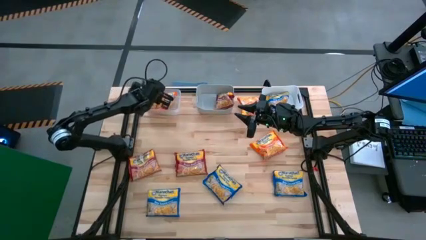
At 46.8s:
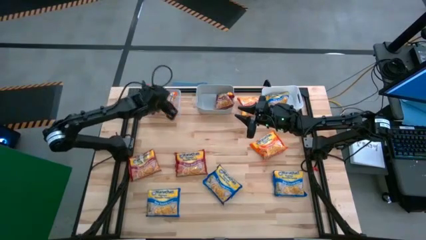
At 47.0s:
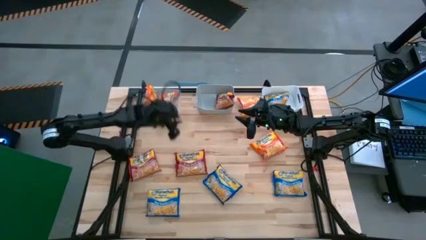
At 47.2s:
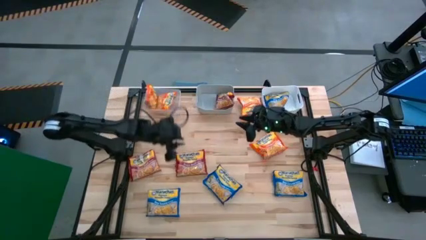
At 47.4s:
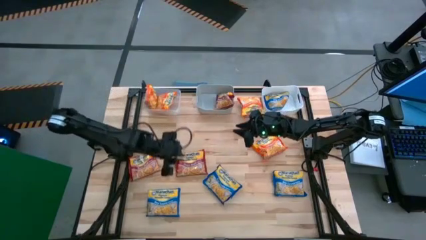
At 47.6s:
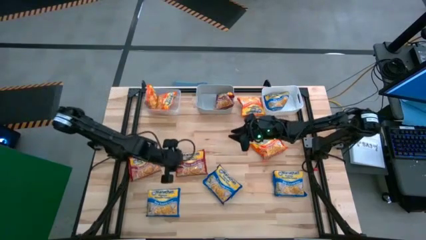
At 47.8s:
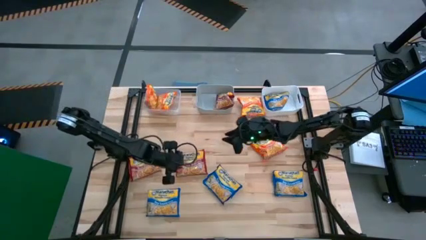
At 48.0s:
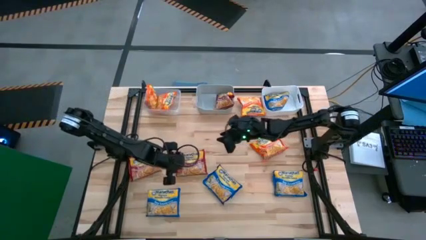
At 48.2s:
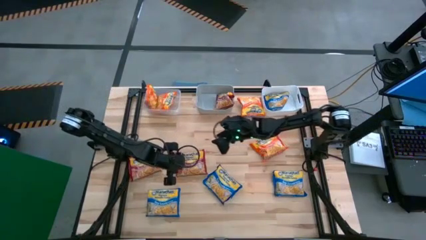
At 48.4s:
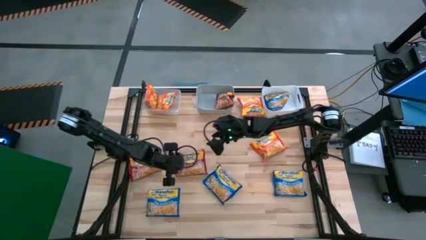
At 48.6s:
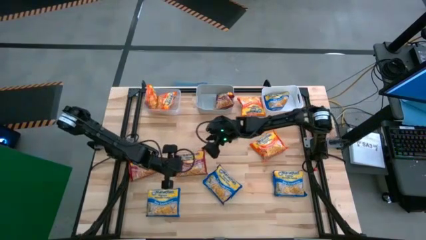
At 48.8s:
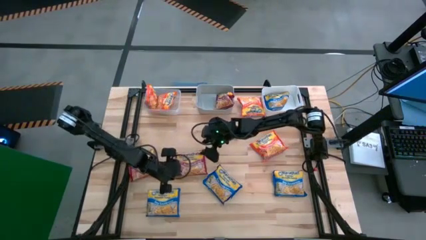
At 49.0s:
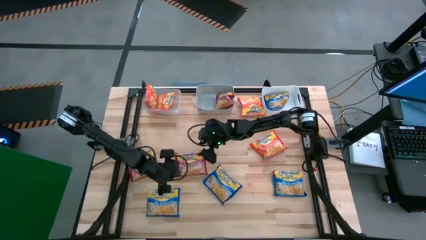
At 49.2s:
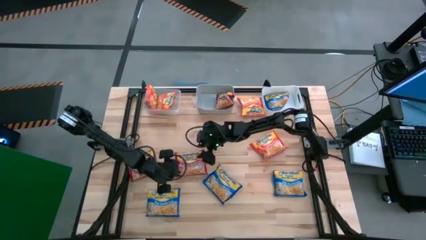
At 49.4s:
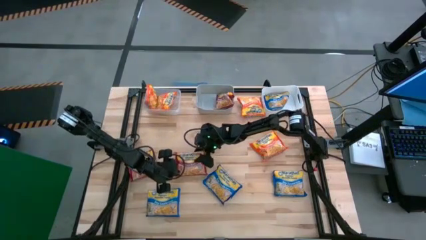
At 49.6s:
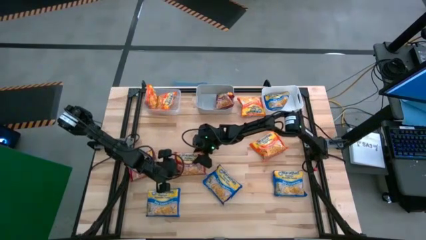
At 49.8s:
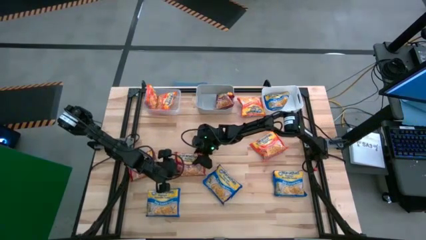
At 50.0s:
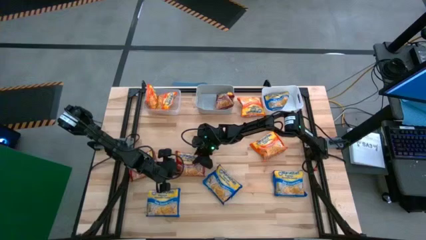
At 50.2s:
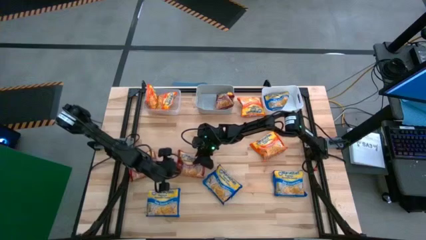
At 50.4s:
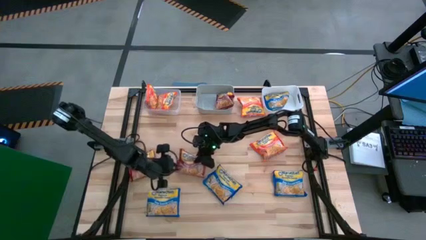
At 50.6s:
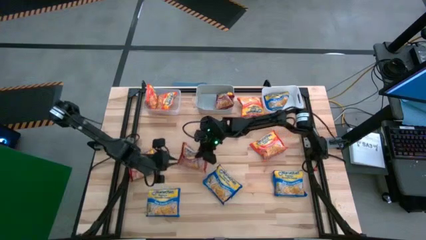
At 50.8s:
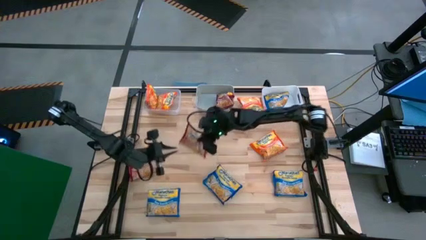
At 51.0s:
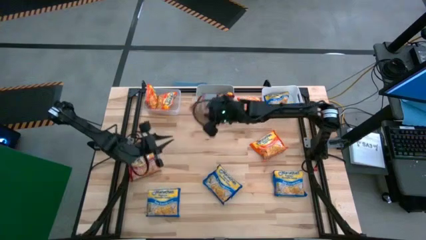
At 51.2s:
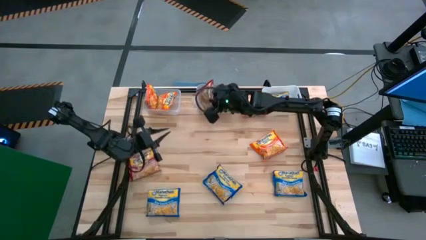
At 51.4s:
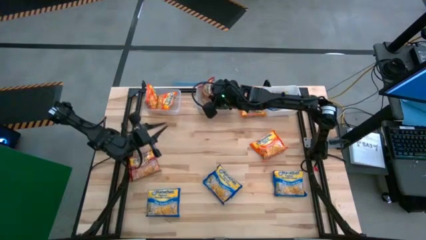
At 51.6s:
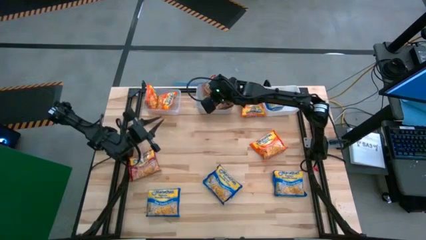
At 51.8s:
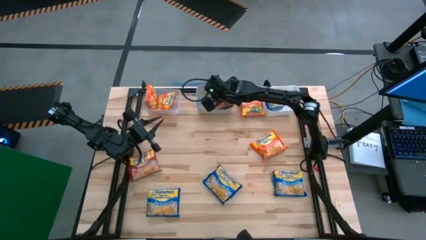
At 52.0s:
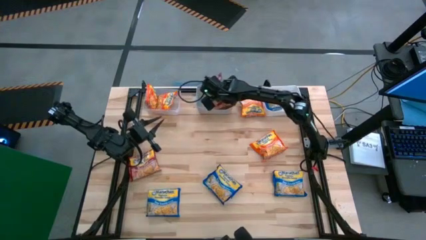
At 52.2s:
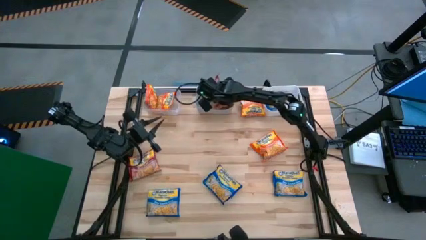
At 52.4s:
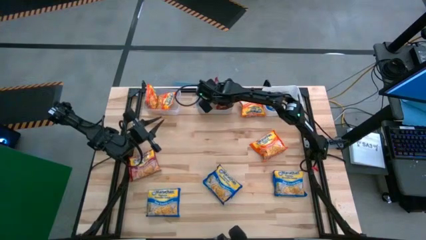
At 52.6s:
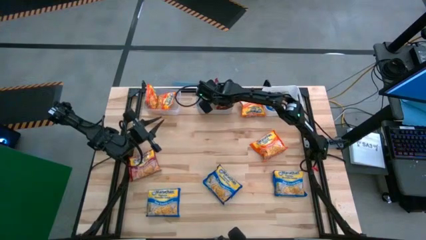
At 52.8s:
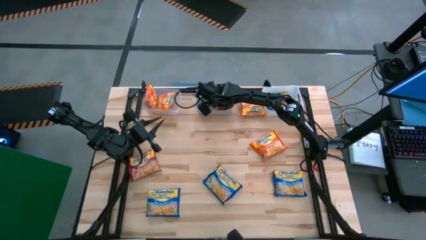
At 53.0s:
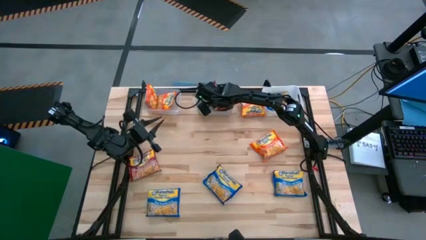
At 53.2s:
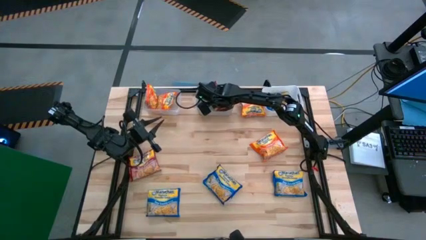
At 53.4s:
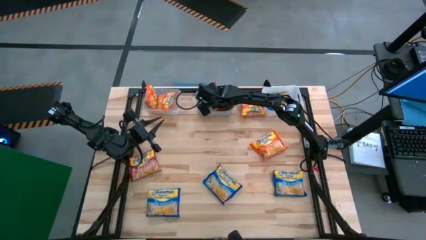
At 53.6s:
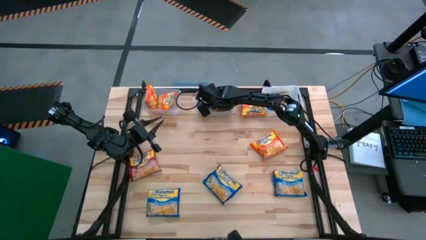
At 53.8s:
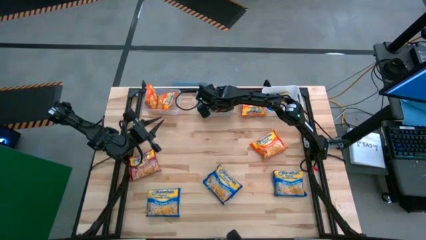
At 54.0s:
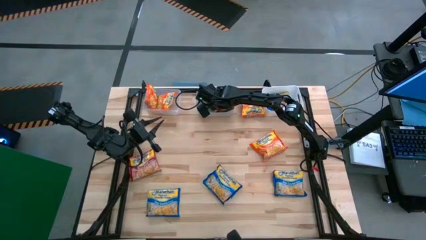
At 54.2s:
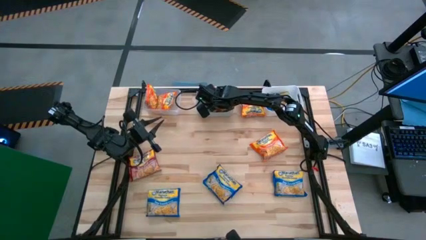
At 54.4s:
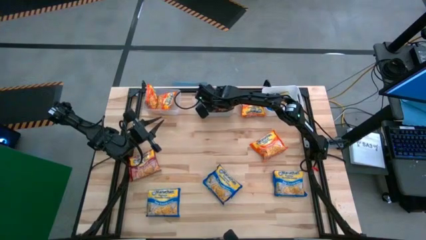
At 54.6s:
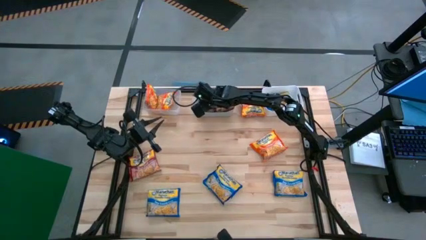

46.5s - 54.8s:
Task: Sort Maruchan noodles
Put the red noodle pack into the grey bin

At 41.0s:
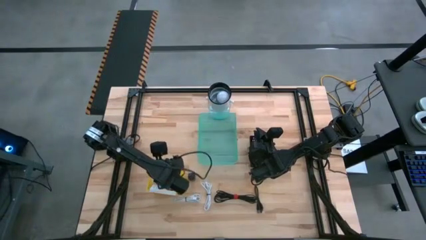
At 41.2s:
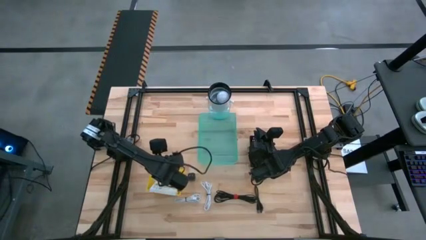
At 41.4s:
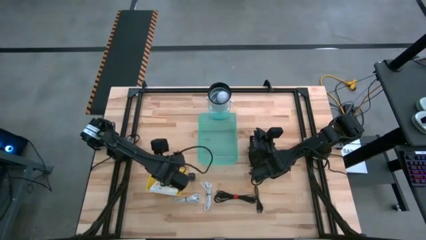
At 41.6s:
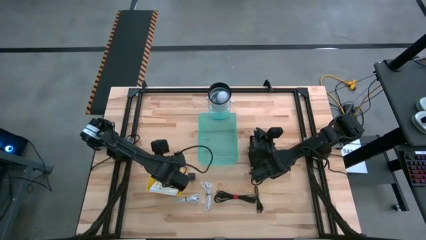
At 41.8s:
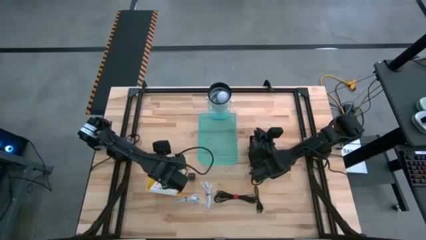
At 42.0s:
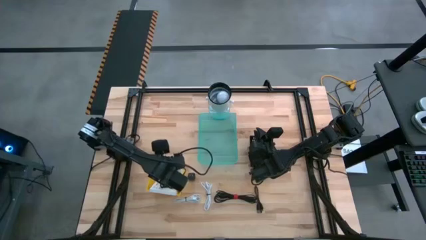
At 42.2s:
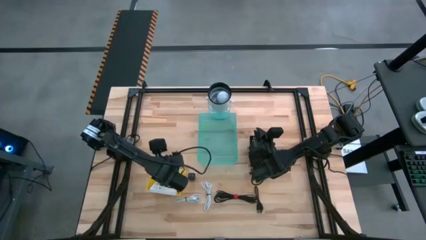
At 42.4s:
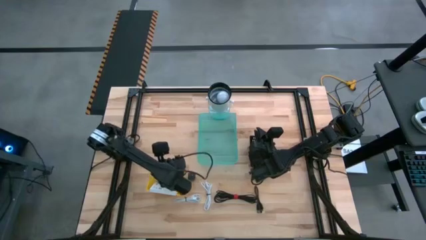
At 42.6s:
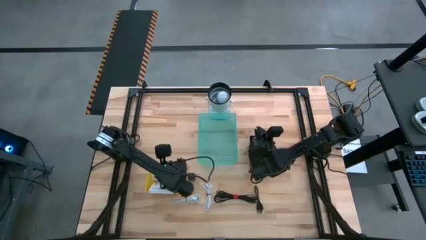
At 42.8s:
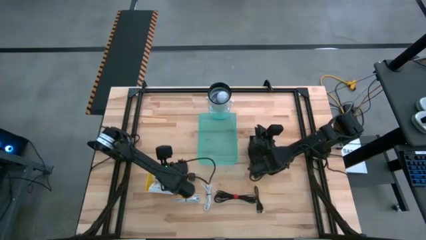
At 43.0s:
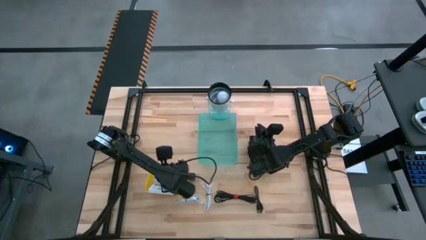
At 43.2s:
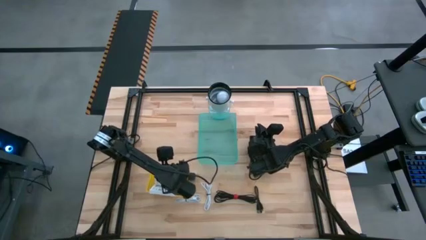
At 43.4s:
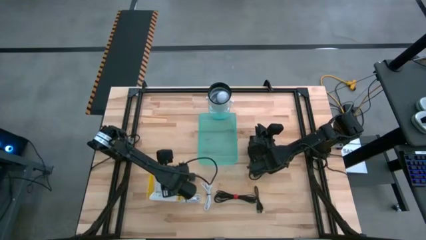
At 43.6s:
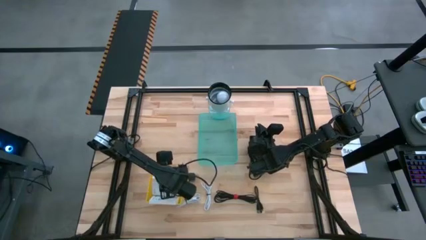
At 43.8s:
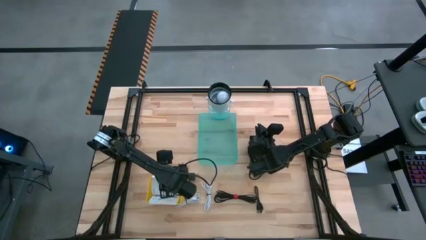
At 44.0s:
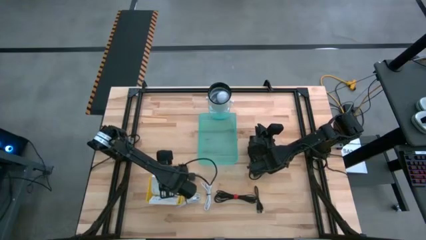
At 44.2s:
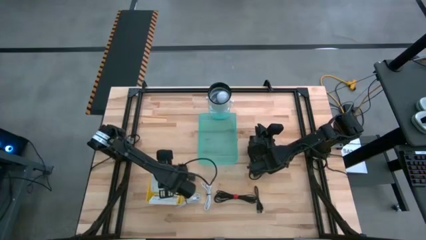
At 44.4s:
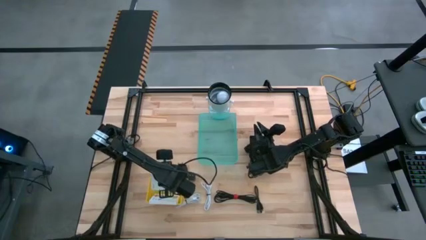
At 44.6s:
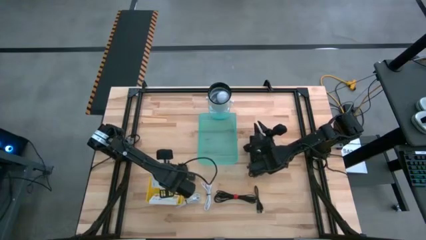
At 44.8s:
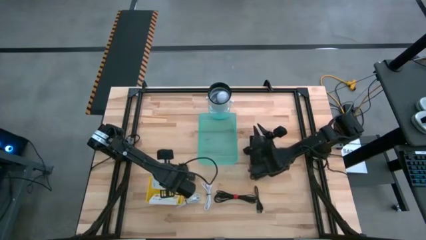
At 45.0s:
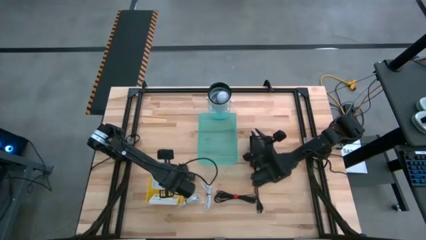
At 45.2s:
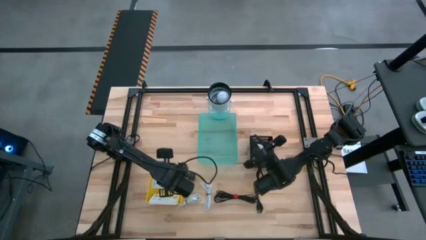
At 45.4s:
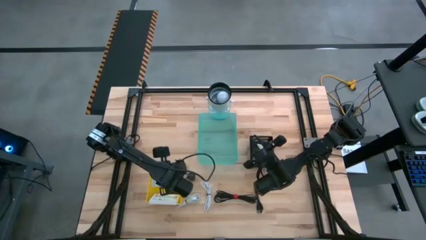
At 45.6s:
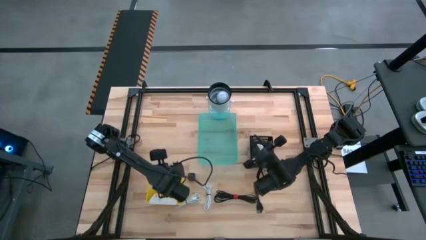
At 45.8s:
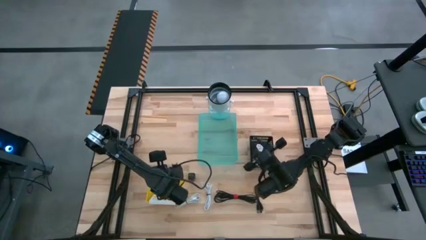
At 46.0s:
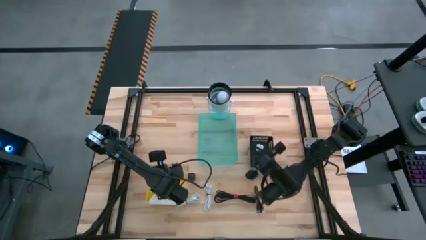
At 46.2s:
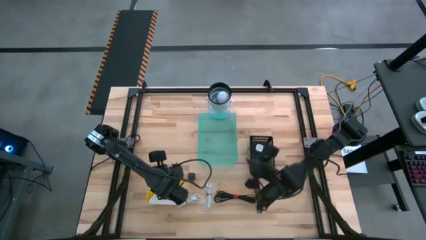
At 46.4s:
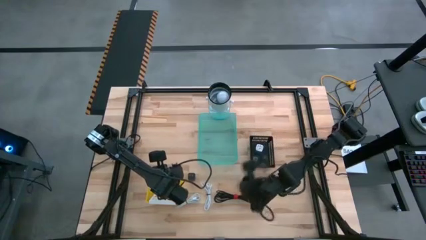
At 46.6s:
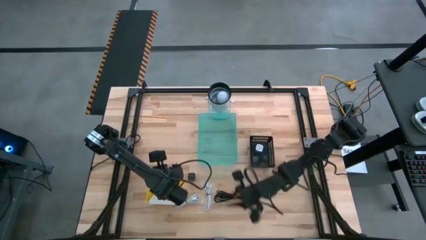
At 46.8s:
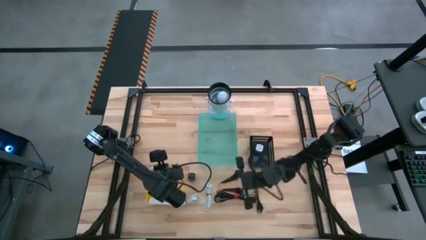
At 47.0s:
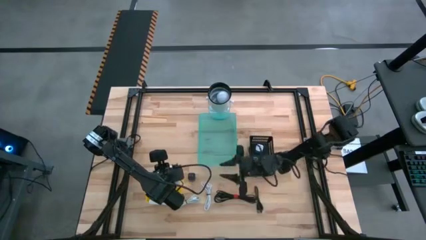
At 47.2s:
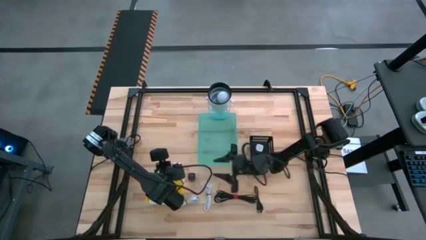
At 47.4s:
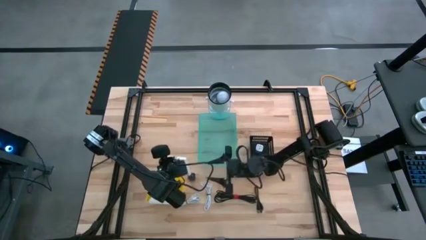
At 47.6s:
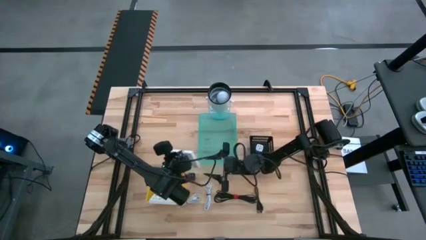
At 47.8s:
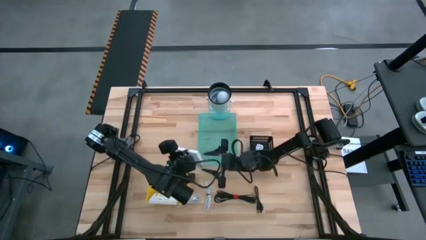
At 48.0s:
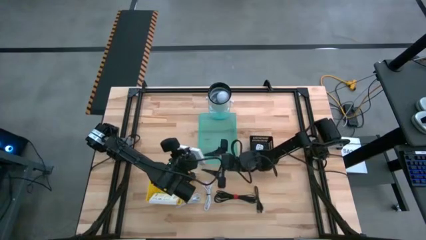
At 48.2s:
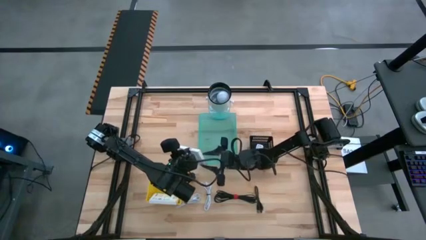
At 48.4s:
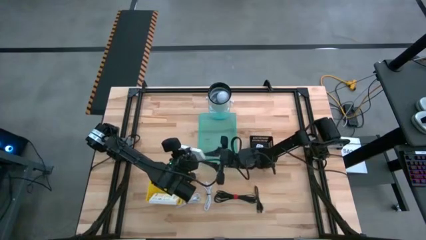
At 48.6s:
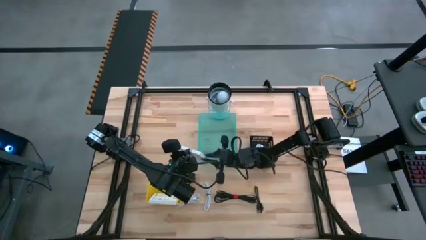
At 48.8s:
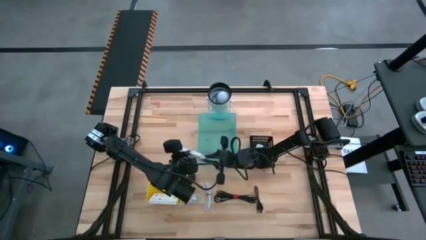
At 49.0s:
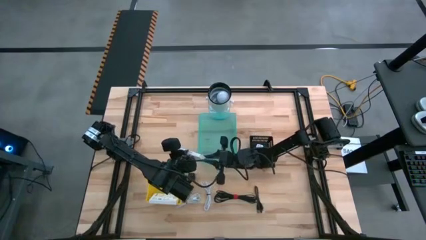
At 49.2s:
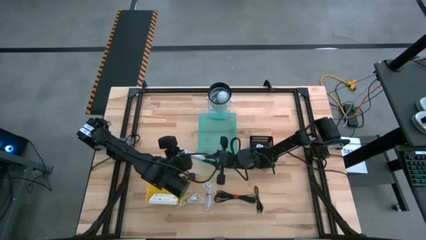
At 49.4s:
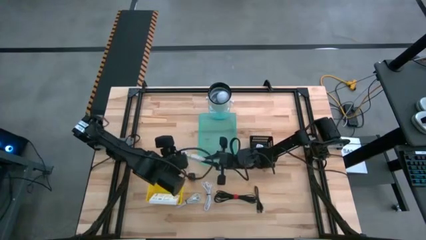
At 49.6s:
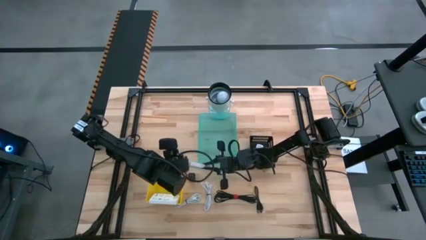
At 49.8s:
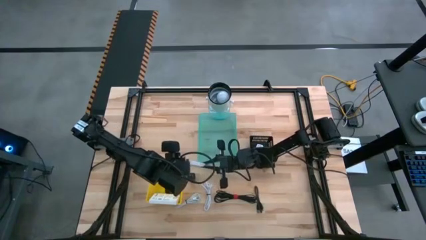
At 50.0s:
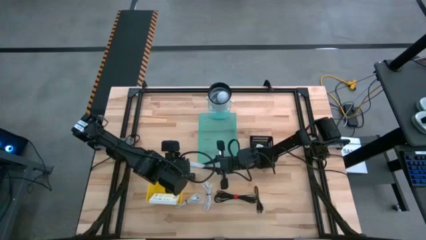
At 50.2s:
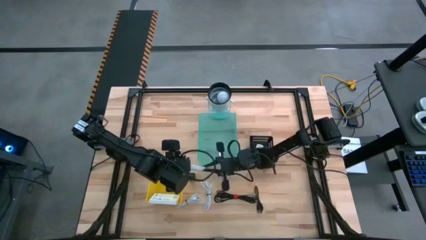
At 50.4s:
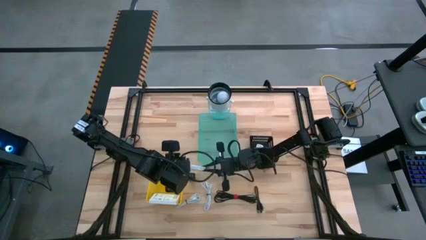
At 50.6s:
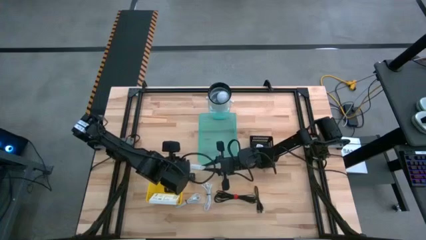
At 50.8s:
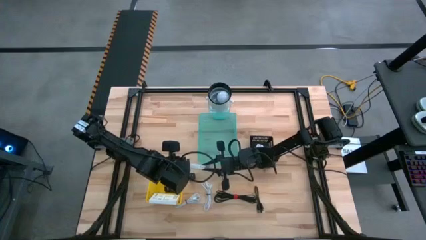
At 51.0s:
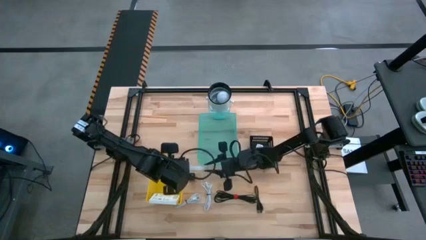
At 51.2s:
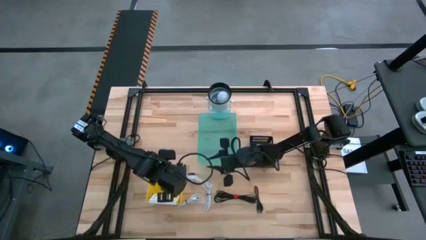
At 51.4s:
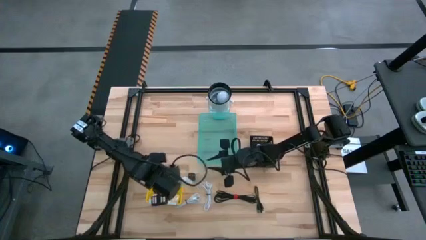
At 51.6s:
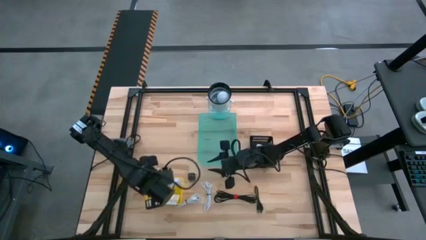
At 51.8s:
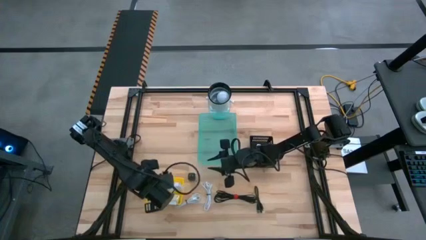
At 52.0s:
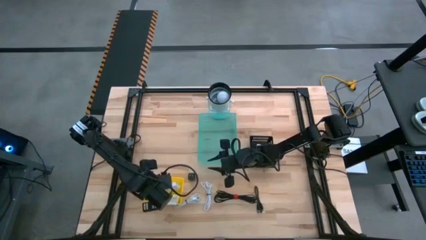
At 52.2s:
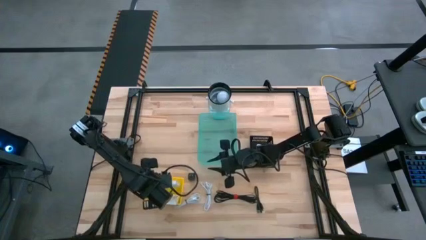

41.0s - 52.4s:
Task: Pick and place items into bin
Put the card reader box into the yellow bin
